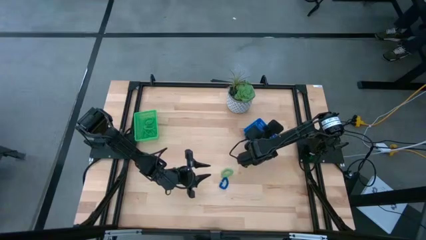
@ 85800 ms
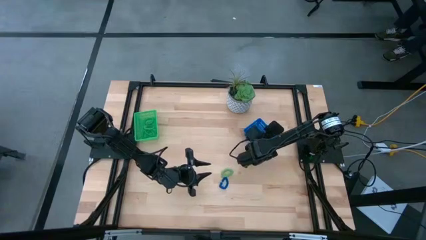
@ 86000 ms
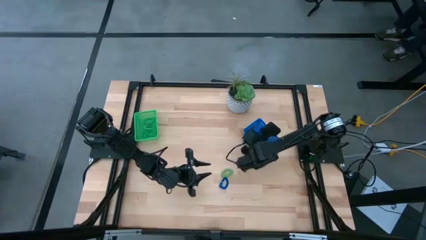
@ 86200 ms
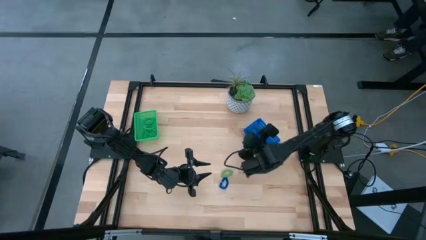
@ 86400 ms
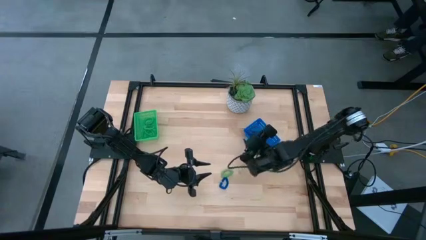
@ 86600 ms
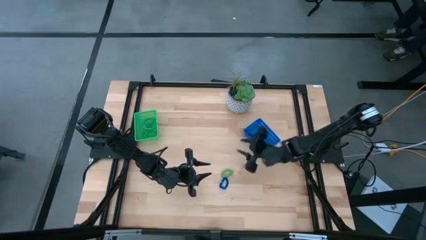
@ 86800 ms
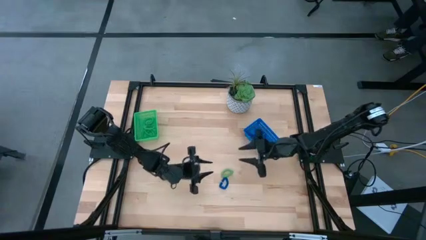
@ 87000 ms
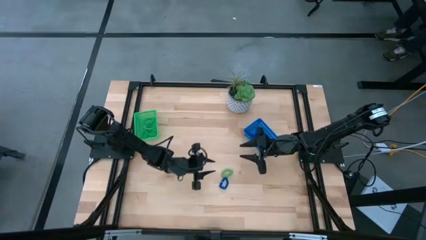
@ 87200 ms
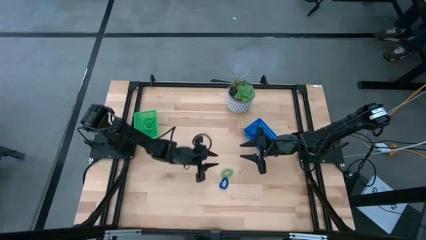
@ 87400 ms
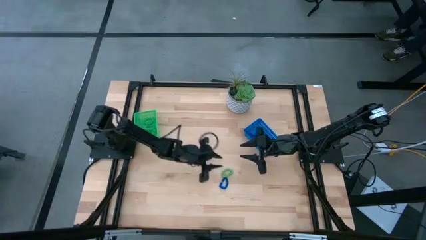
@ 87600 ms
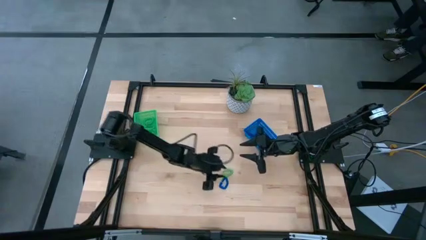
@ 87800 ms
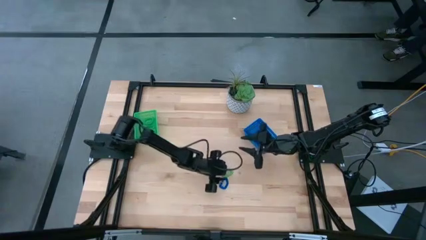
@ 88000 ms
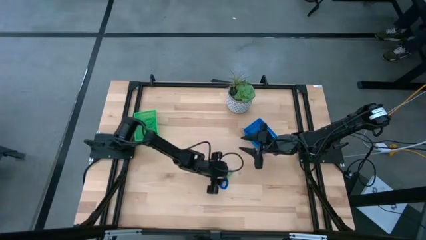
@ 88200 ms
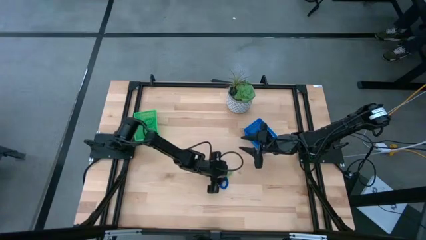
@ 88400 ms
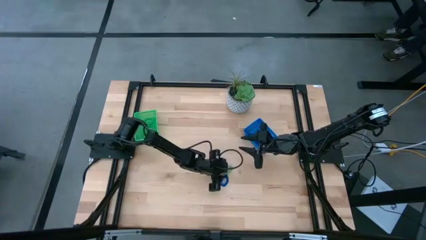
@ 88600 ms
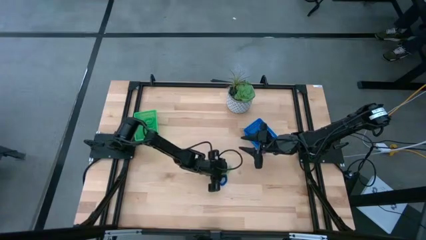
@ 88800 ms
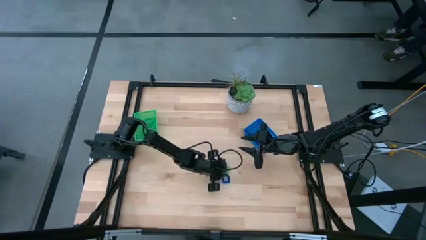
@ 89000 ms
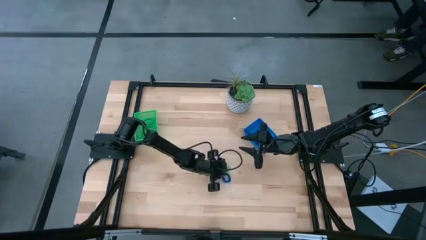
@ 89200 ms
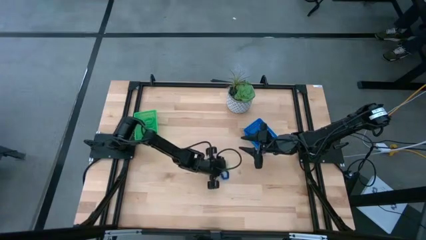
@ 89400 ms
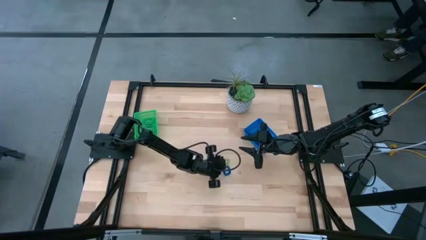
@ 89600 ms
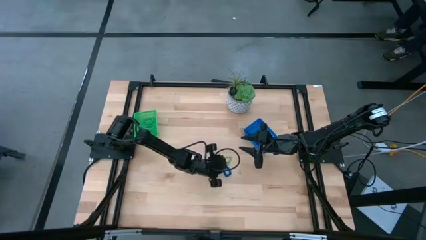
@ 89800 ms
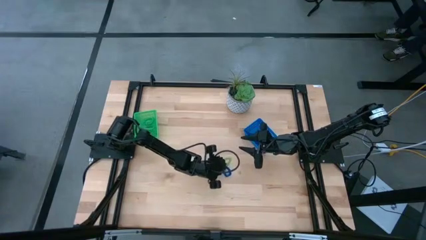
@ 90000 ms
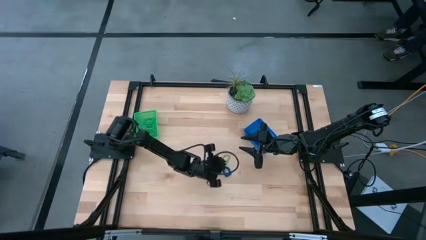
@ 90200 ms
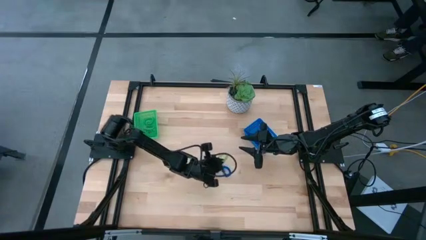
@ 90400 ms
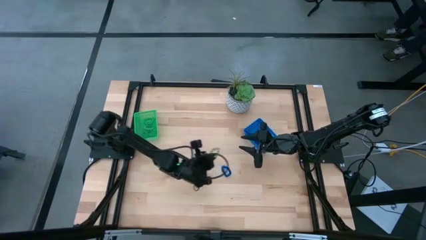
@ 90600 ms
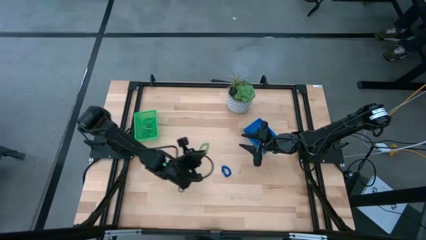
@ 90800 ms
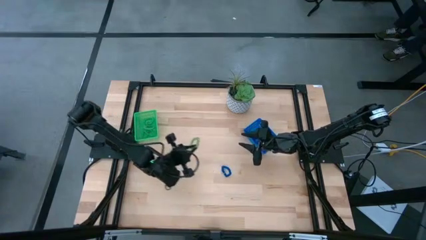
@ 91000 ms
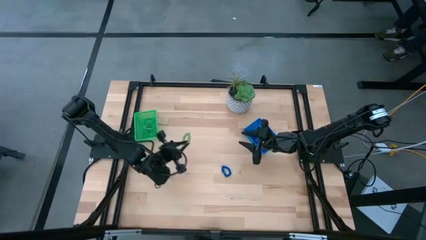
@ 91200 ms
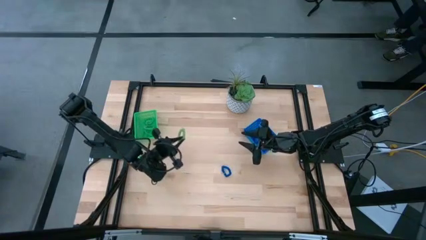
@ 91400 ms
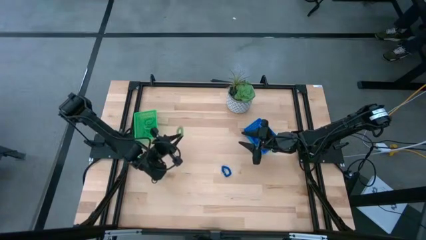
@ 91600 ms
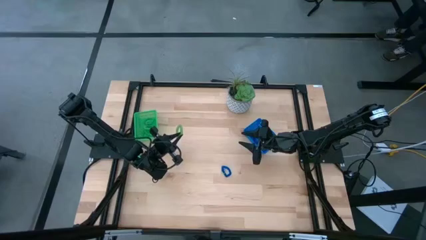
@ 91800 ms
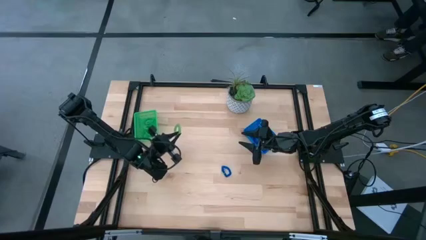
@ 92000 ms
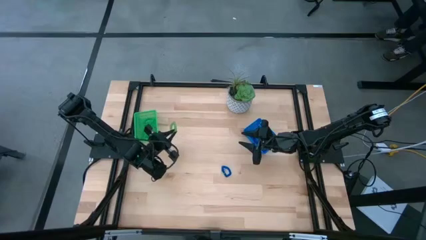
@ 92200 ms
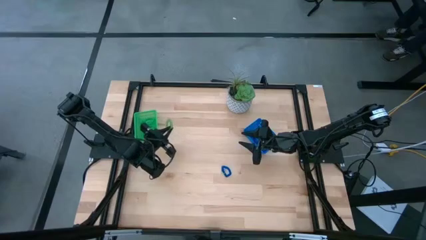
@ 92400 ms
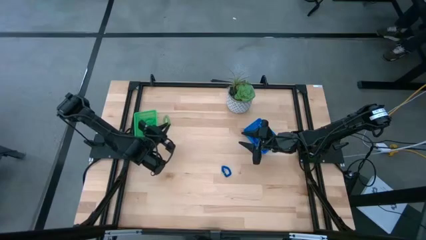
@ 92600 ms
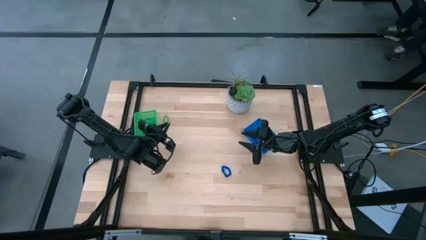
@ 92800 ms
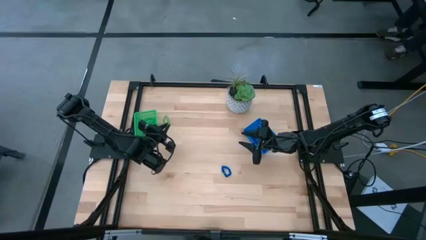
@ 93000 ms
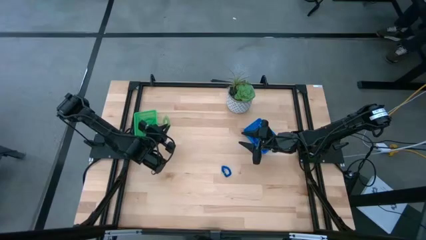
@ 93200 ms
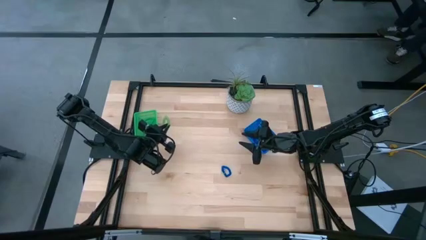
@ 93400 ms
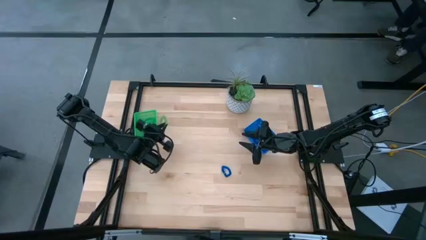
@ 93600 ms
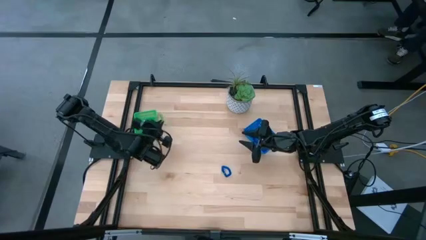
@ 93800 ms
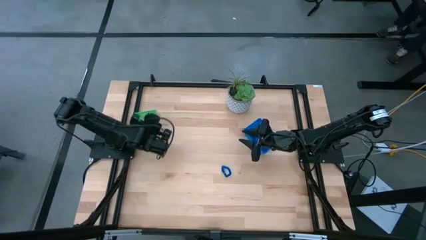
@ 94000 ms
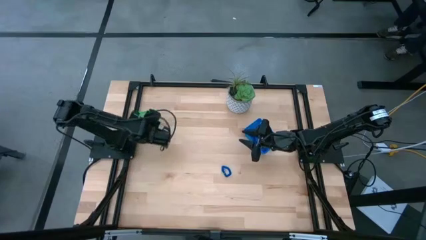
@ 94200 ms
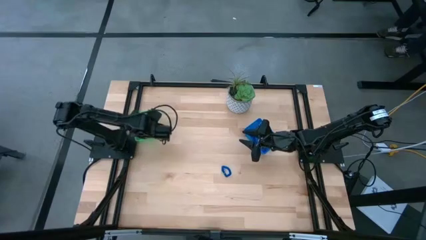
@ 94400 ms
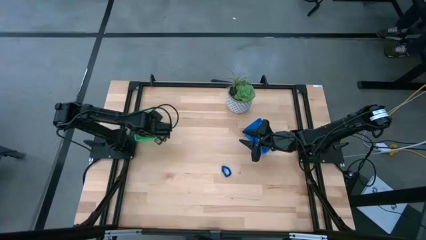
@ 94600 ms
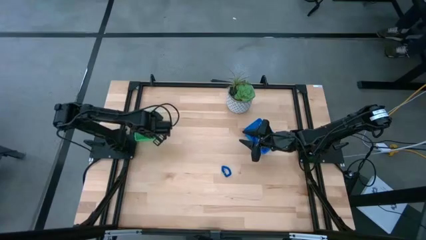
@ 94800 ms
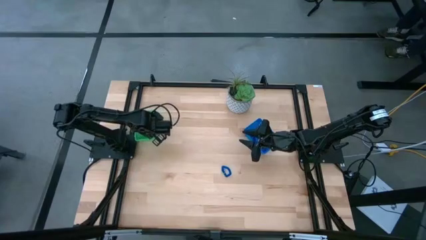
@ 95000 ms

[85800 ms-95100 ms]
Task: Sort spring keychains
Put the green spring keychain in the green bin

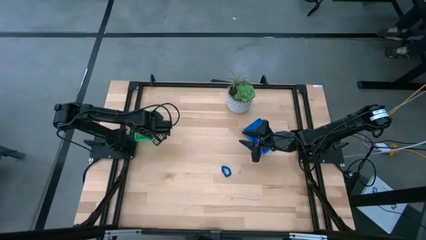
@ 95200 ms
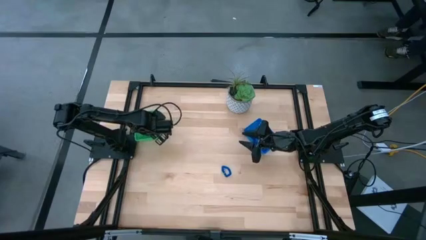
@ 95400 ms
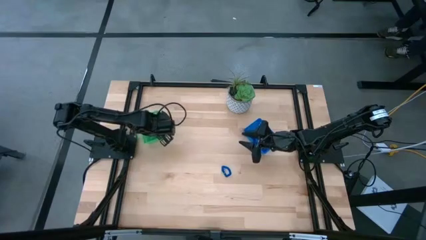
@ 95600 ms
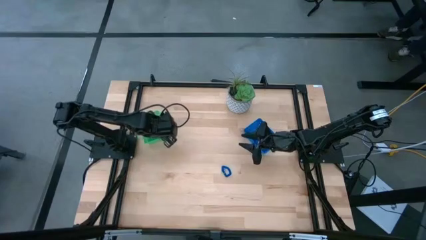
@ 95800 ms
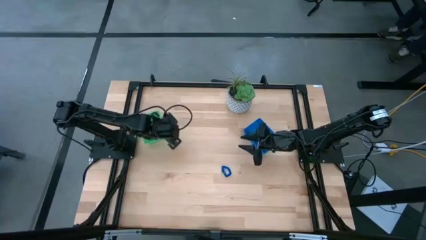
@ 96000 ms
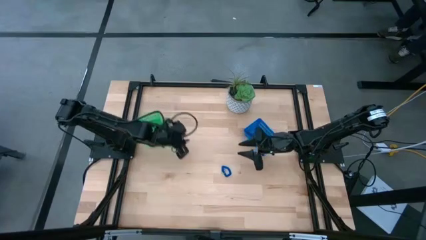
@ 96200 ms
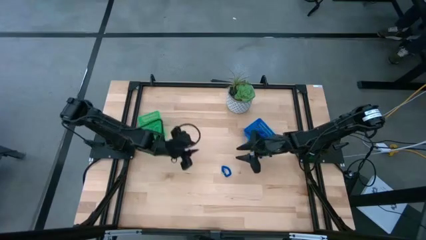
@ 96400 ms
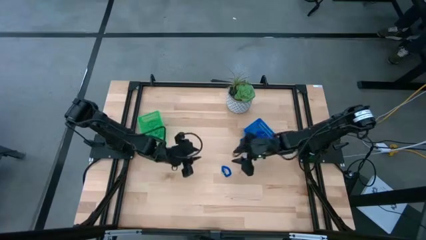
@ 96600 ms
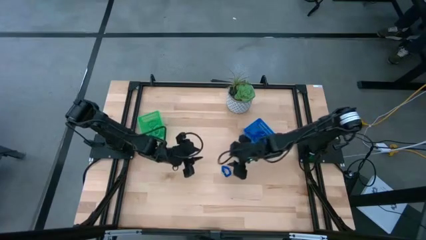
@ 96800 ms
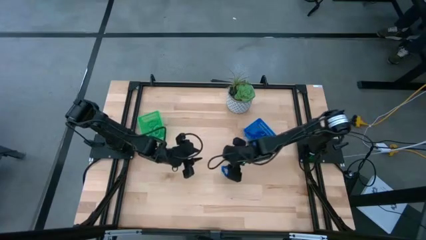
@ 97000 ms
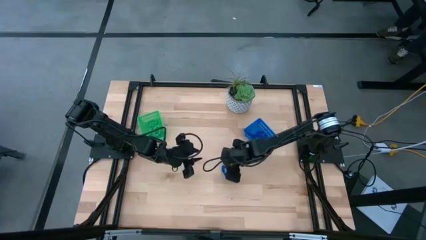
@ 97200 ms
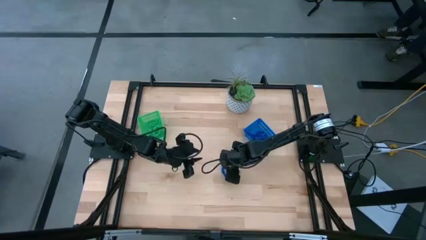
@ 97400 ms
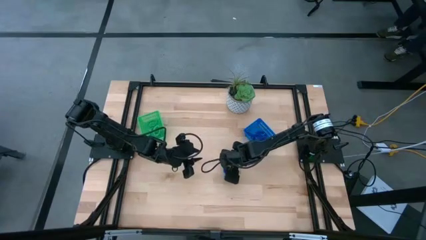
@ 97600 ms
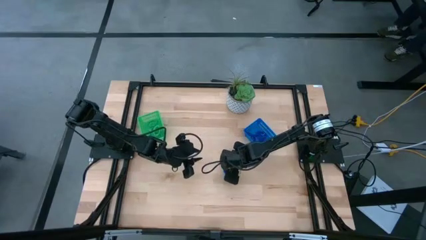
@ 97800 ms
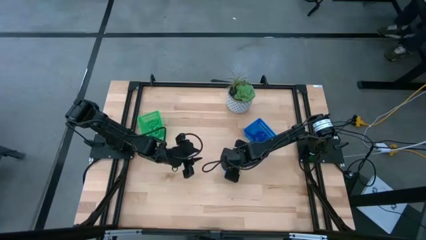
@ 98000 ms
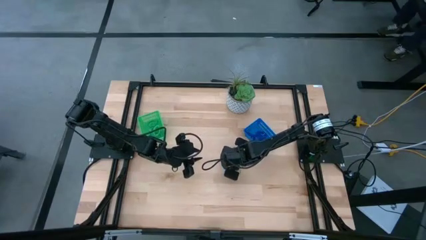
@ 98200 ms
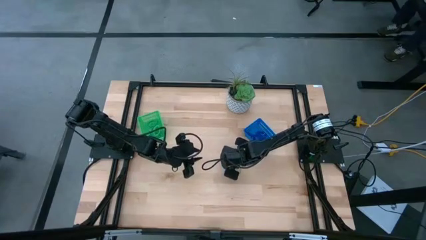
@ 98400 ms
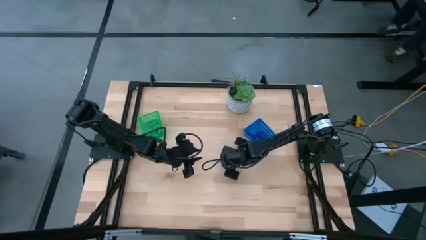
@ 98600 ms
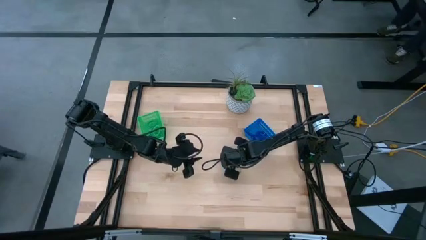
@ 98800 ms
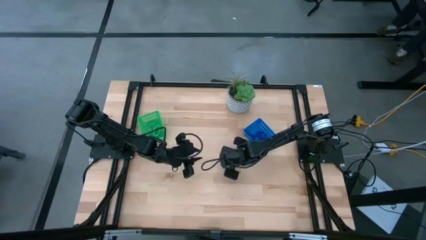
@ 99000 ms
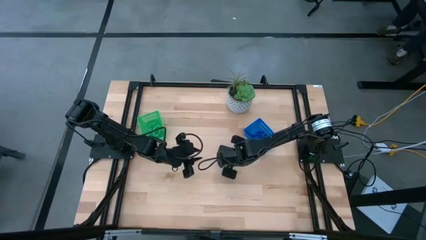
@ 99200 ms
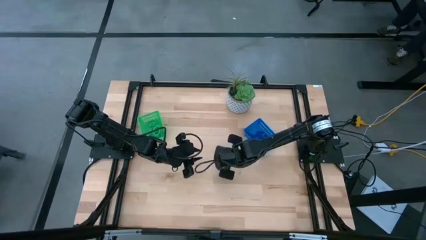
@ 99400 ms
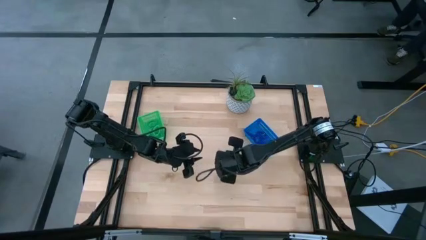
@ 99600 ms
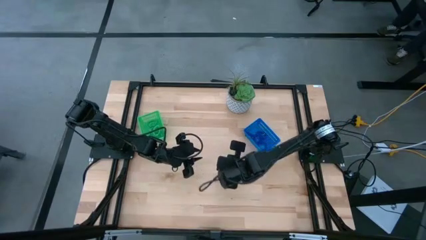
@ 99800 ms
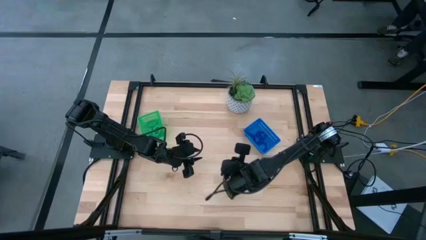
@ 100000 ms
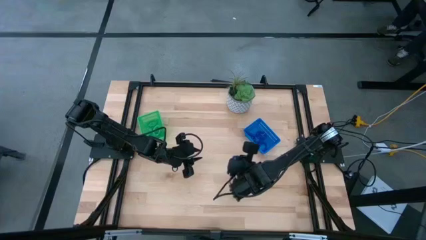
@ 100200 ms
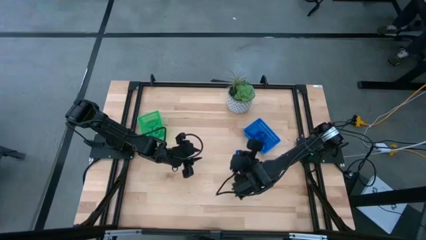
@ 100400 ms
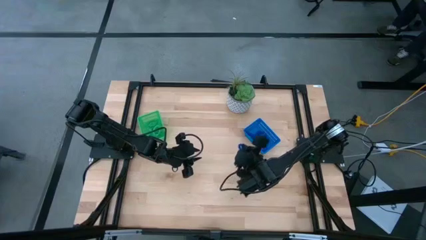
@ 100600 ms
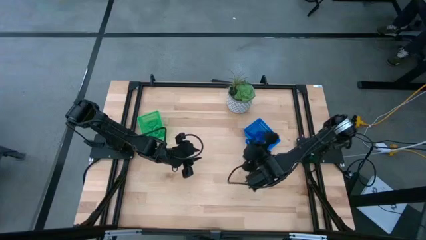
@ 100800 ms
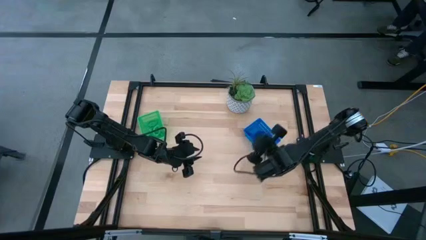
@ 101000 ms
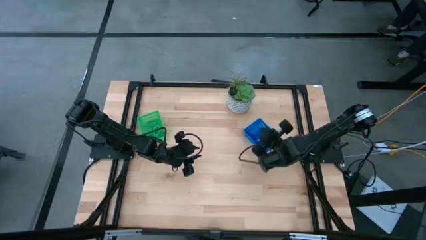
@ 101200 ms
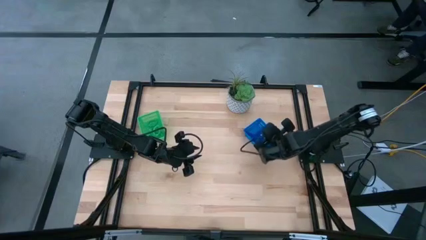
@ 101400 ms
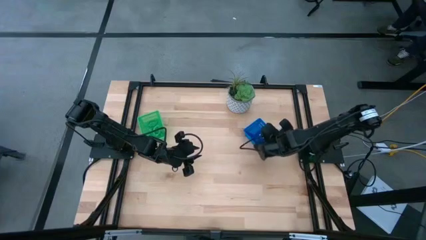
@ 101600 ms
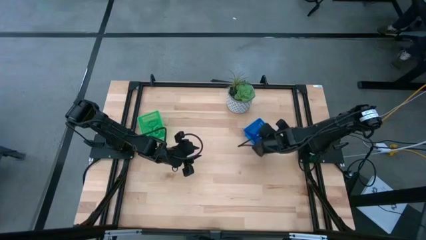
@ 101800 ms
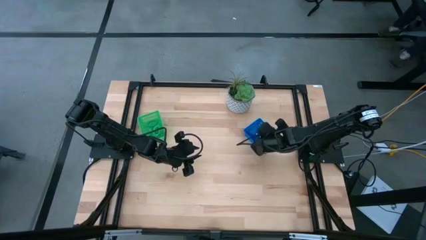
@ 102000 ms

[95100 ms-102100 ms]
Put the blue spring keychain in the blue bin
